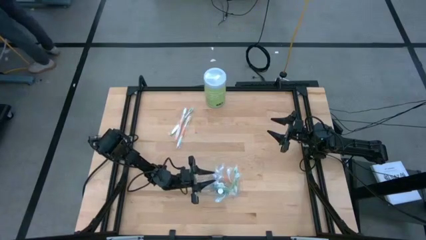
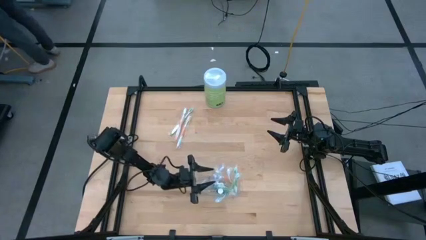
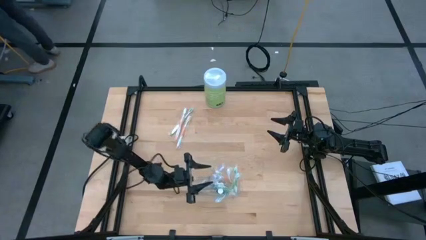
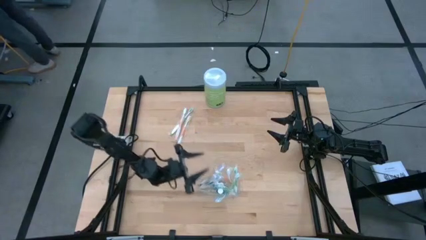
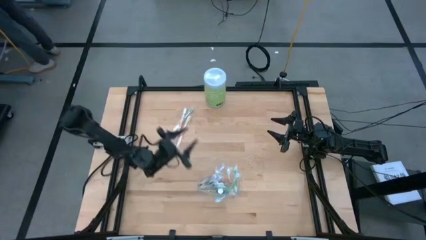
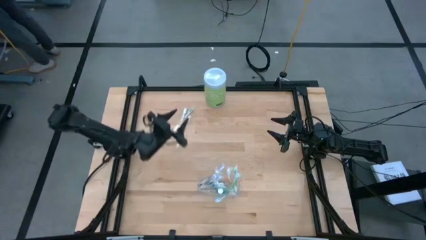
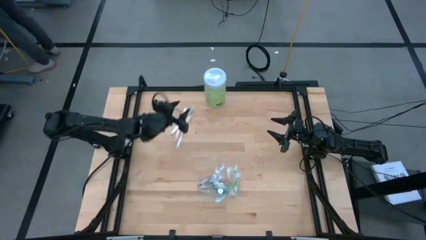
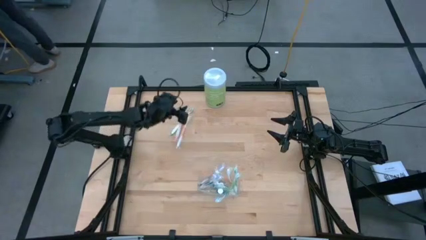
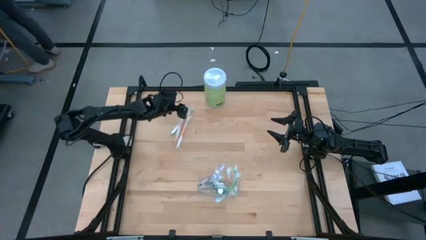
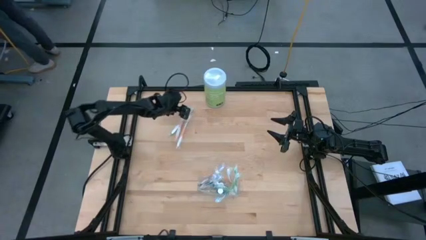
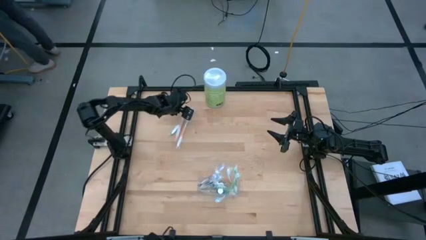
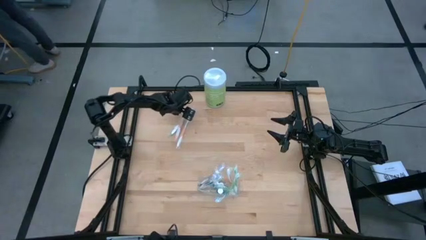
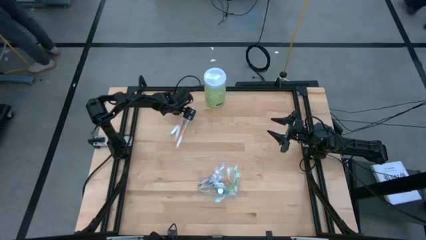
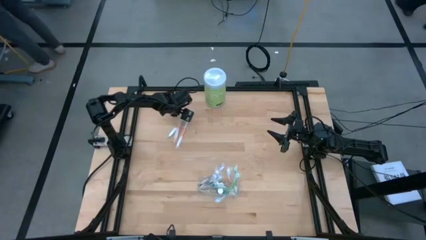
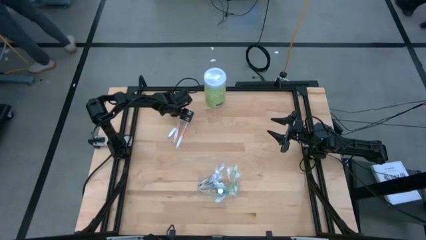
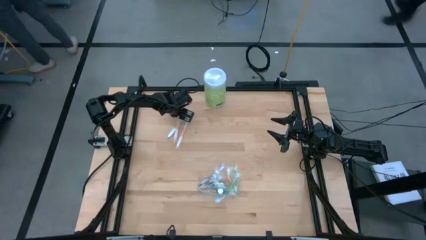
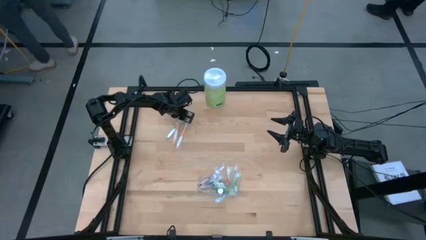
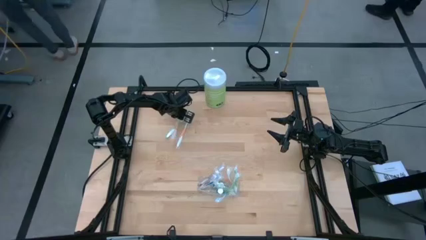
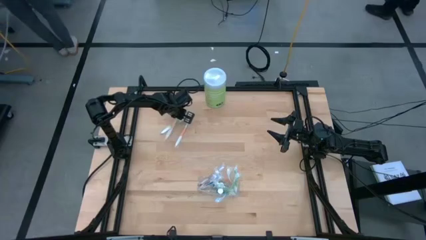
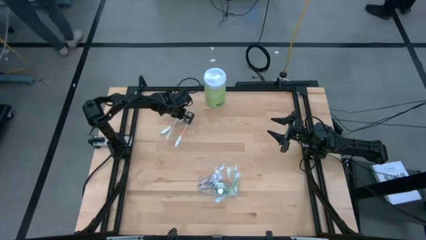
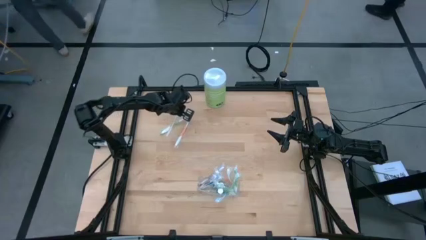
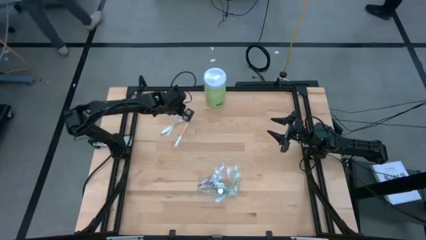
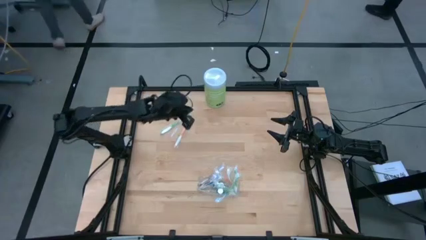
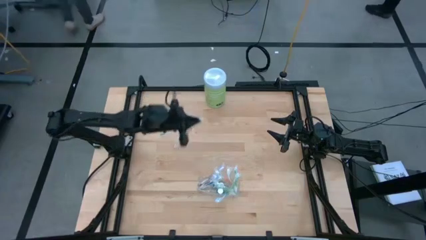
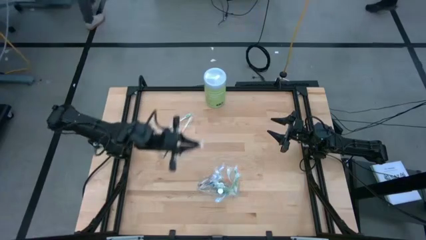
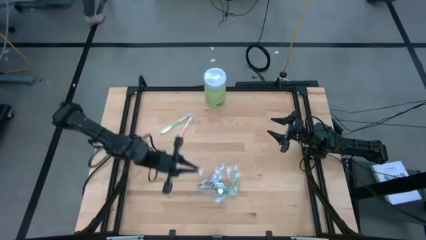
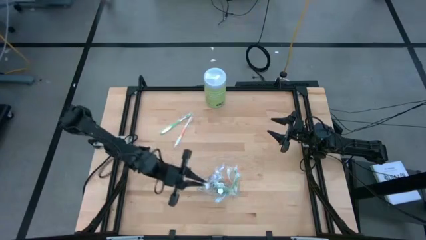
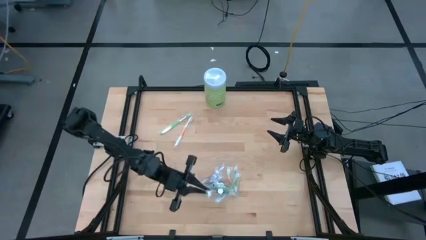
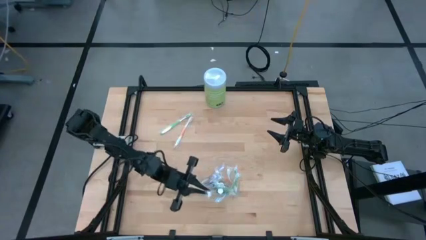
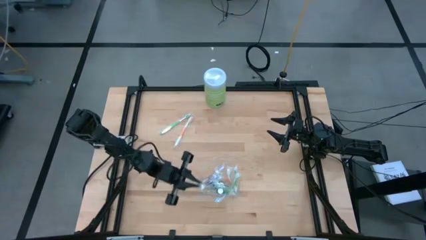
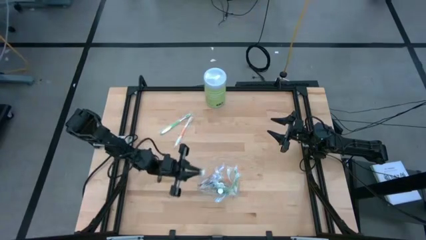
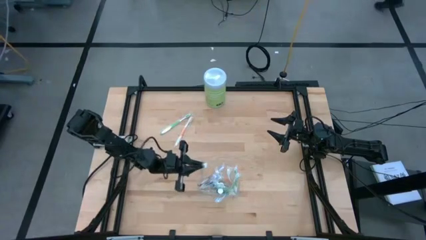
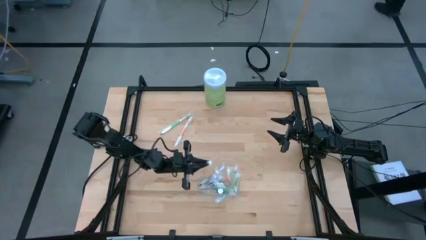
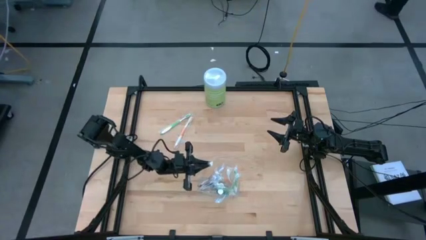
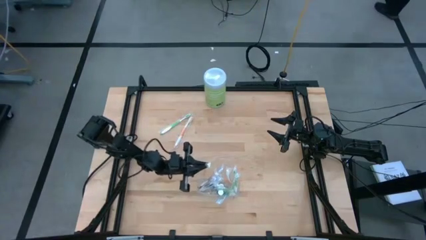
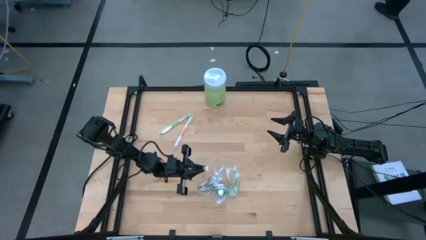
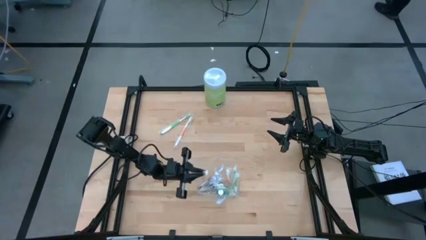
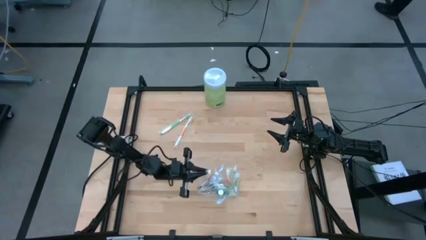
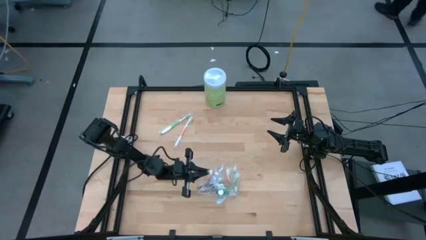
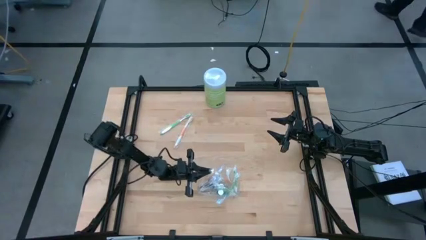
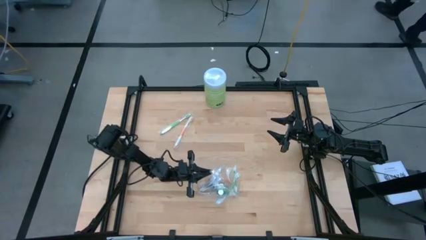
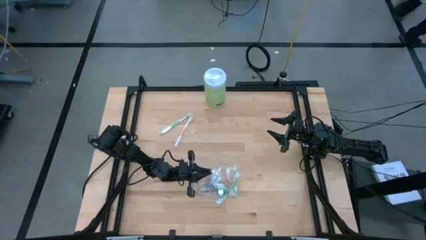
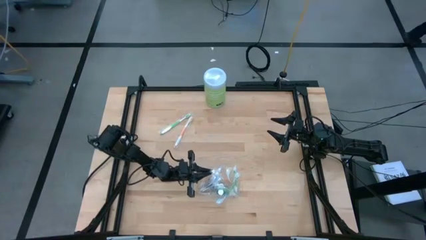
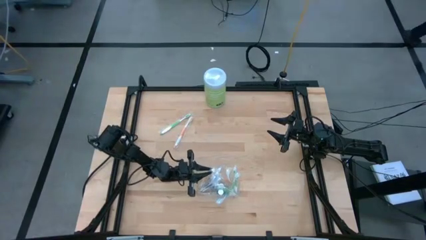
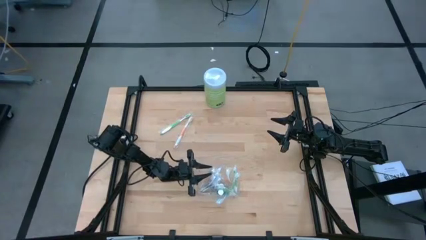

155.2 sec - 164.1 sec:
Task: Pick & Place toothbrushing station
Put the orange toothbrush into the transparent organizer

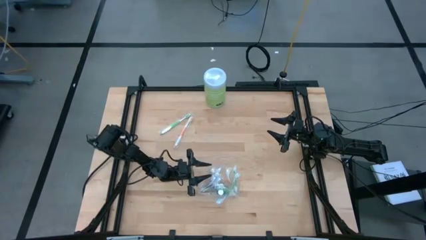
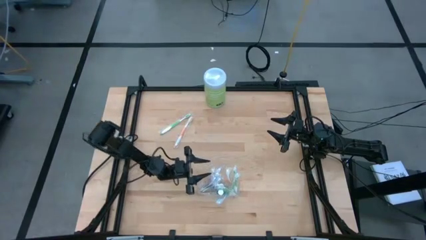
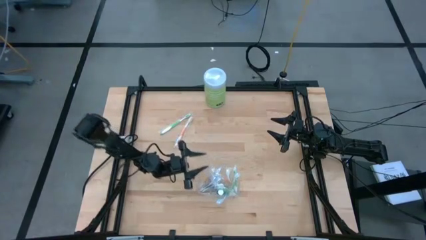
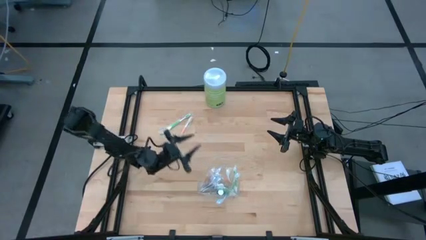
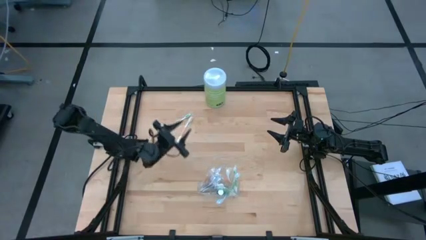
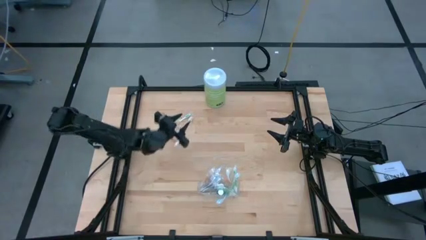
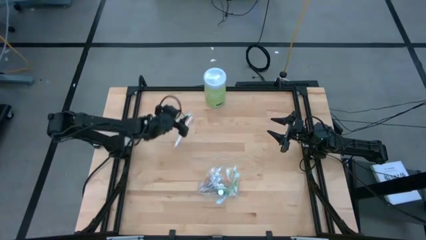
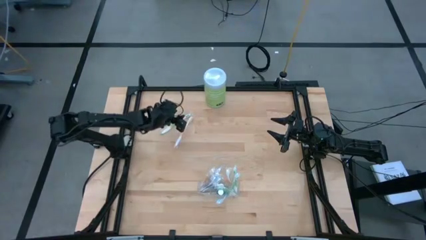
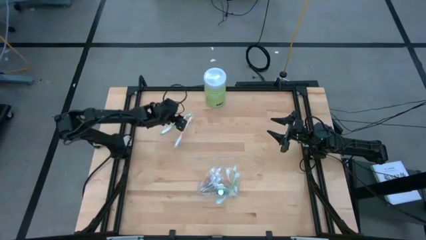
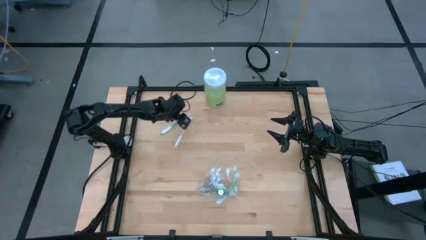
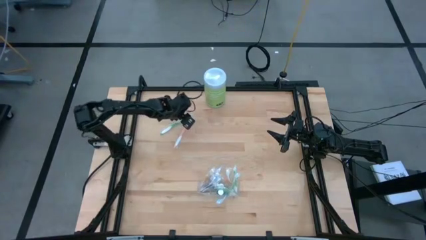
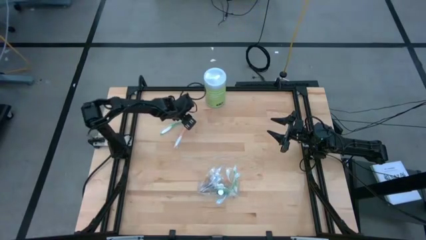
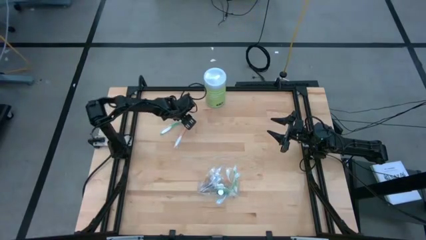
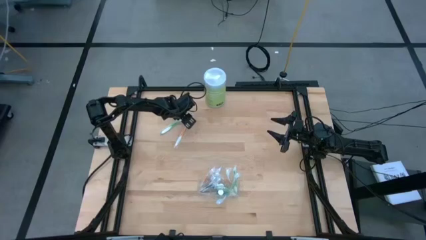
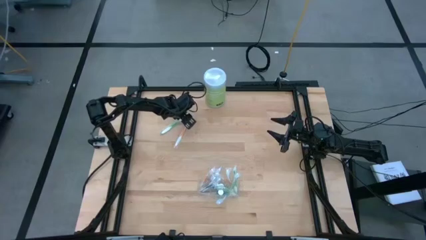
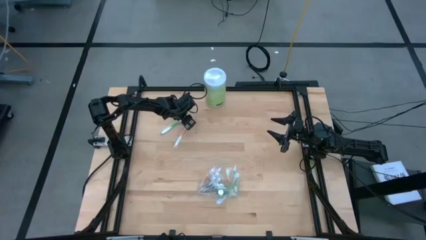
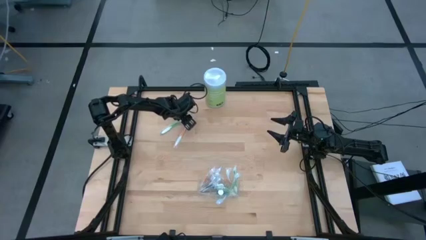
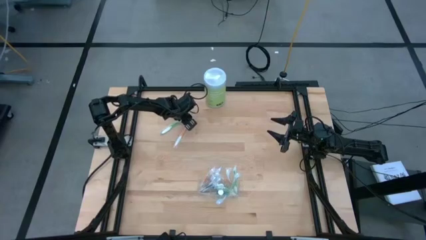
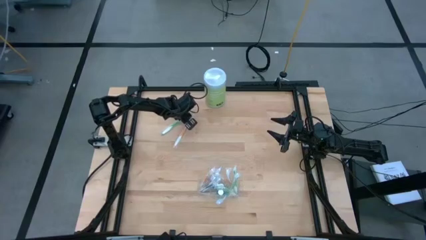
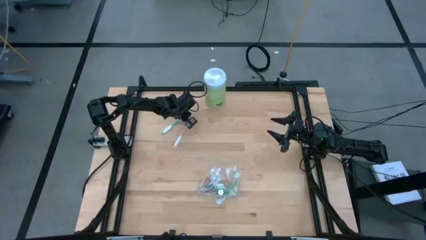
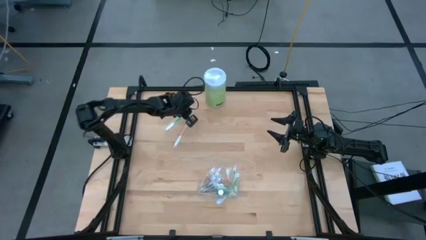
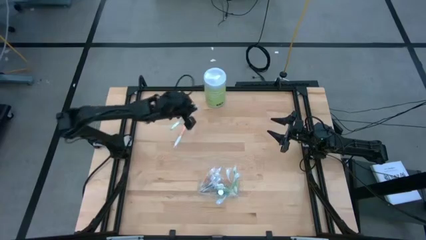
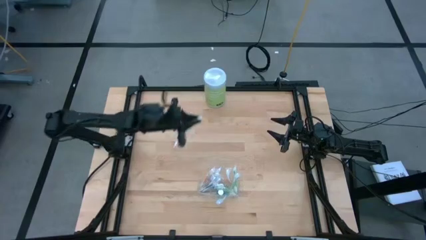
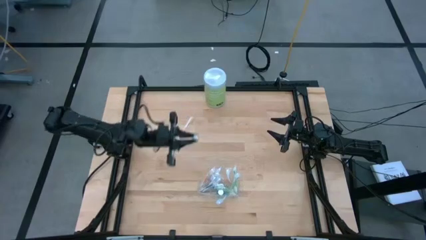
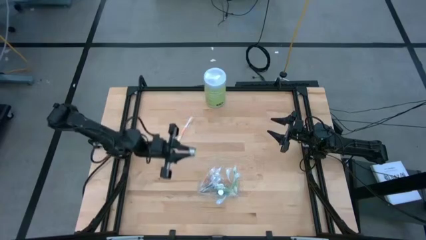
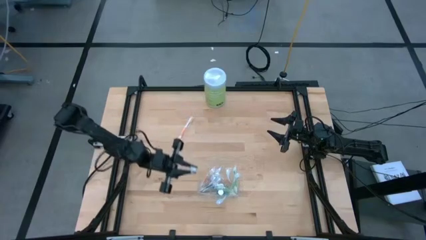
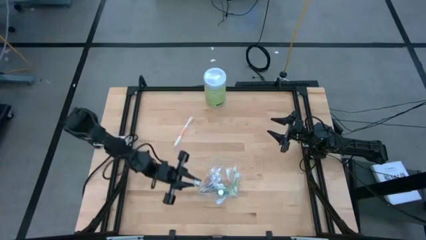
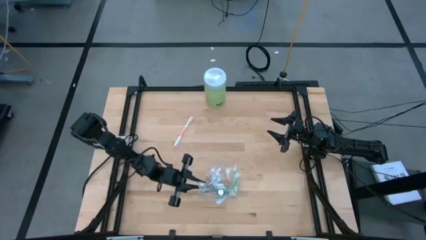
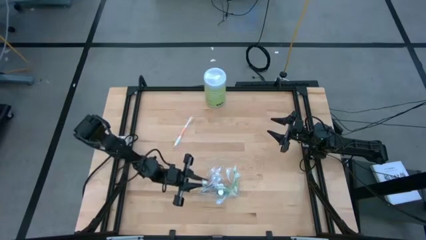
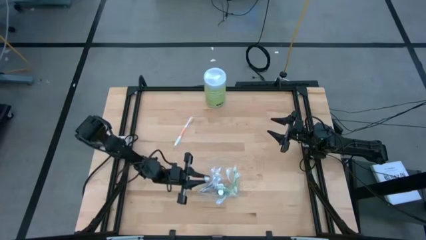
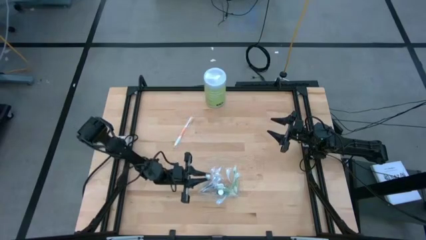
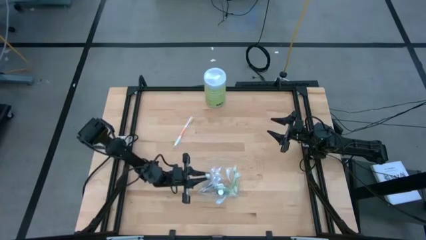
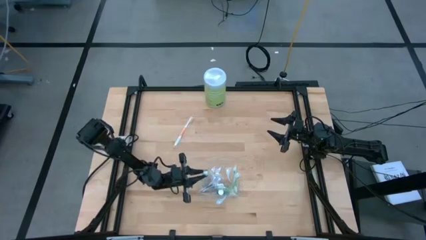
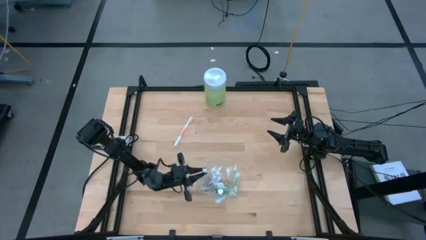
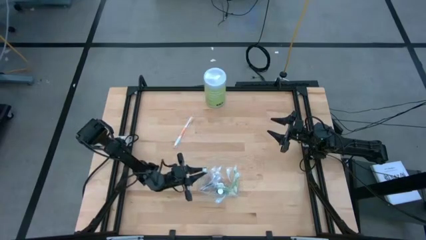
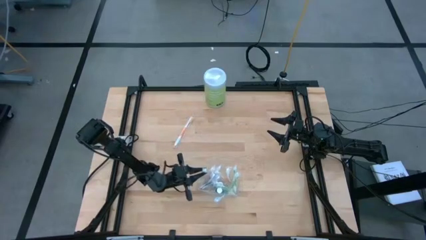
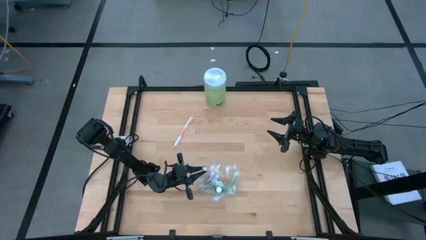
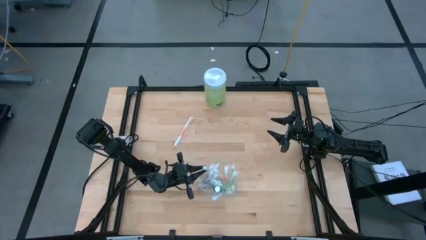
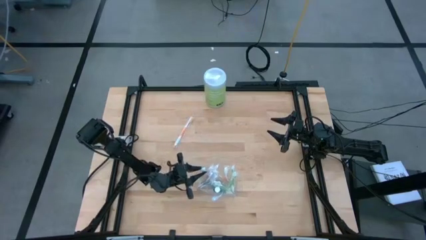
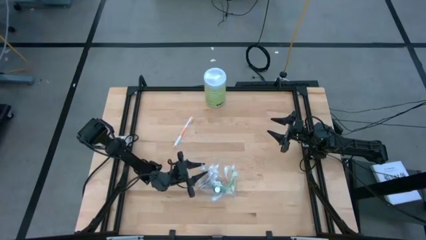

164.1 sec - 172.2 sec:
Put the green toothbrush into the transparent organizer
